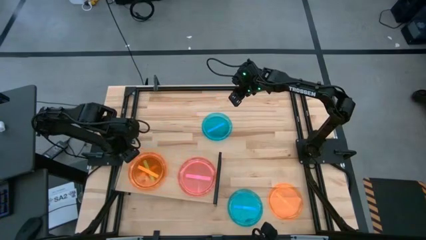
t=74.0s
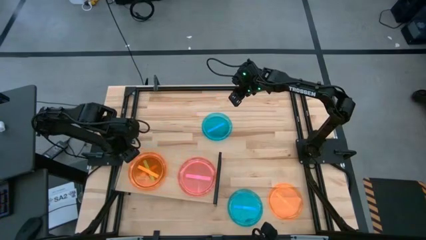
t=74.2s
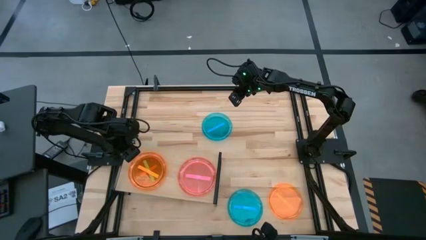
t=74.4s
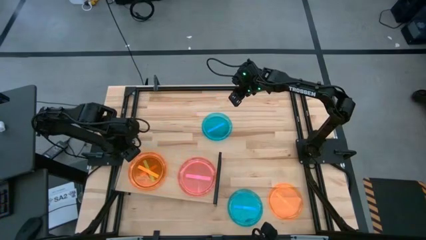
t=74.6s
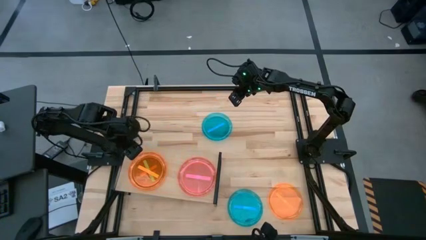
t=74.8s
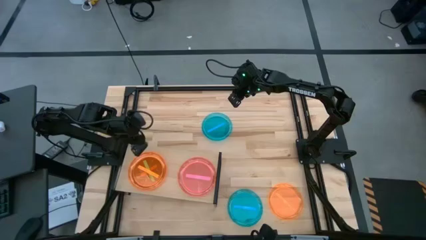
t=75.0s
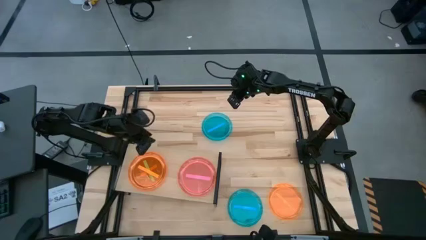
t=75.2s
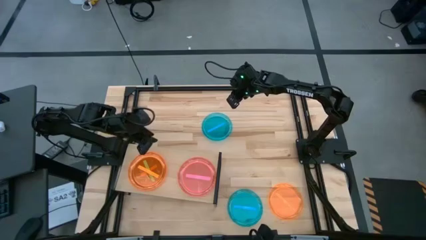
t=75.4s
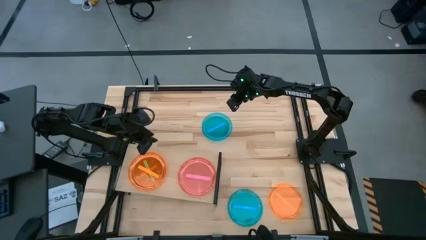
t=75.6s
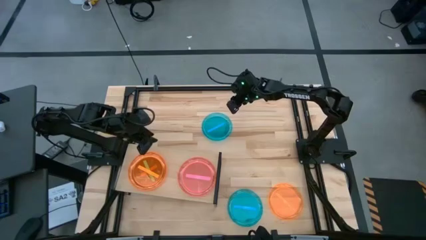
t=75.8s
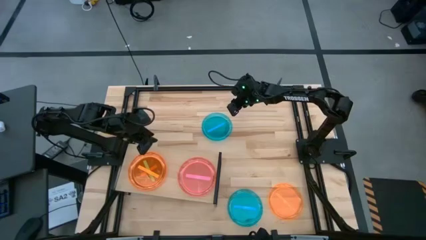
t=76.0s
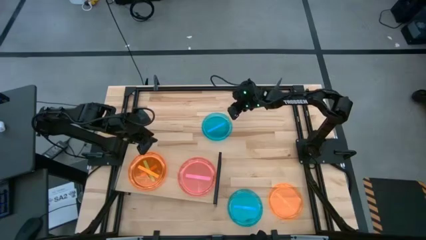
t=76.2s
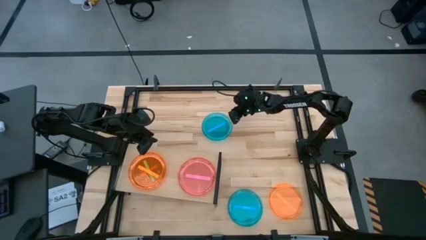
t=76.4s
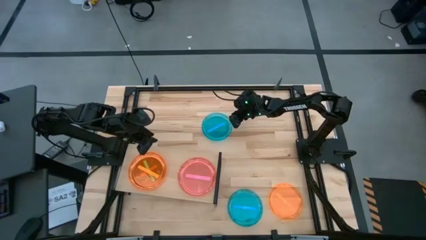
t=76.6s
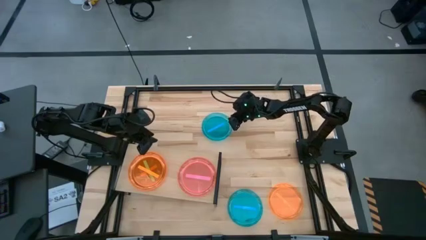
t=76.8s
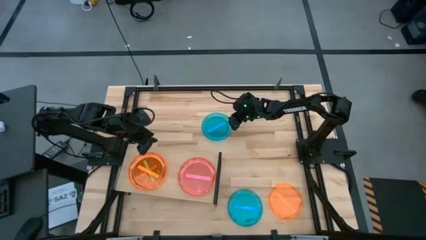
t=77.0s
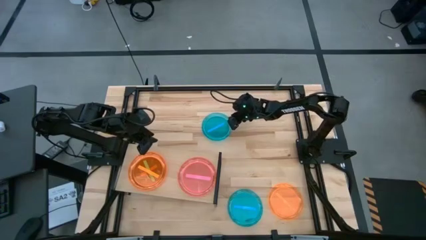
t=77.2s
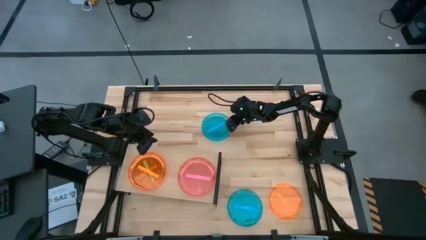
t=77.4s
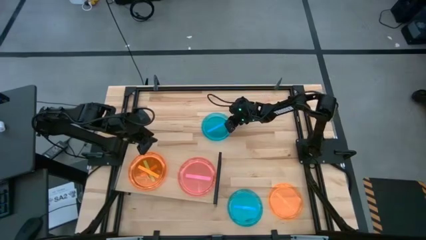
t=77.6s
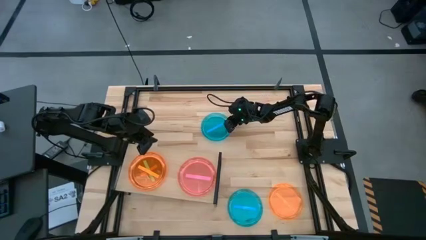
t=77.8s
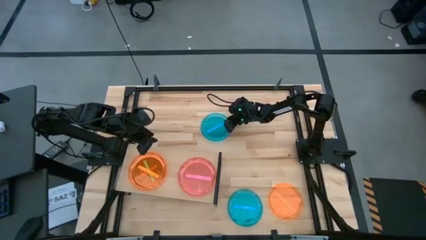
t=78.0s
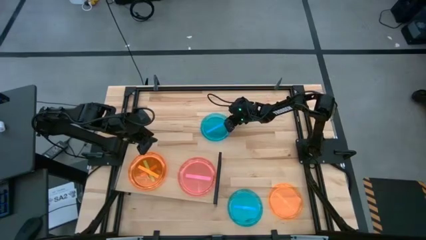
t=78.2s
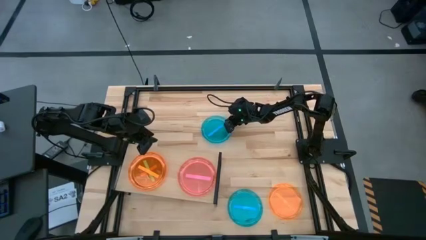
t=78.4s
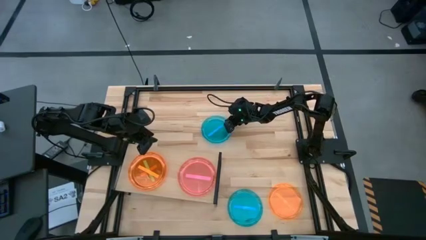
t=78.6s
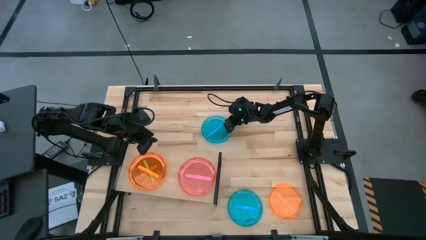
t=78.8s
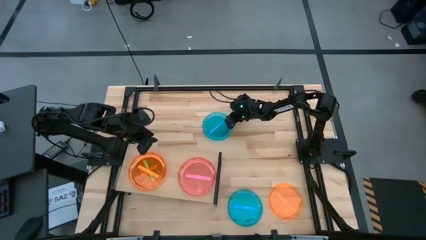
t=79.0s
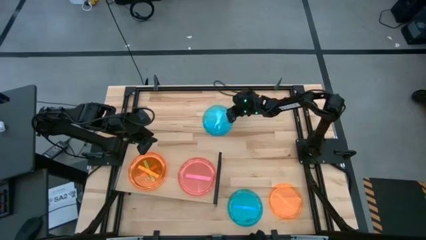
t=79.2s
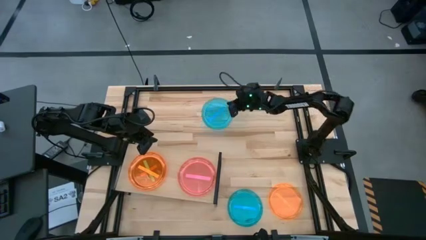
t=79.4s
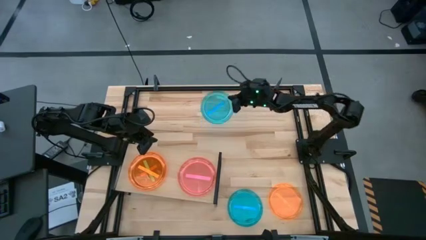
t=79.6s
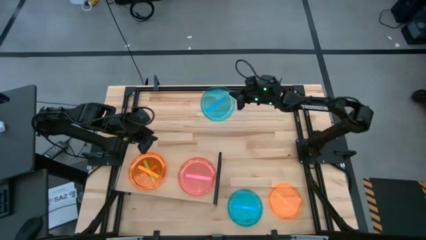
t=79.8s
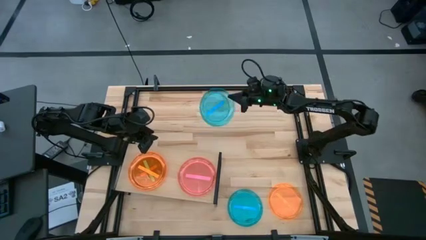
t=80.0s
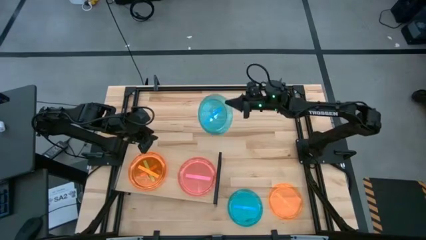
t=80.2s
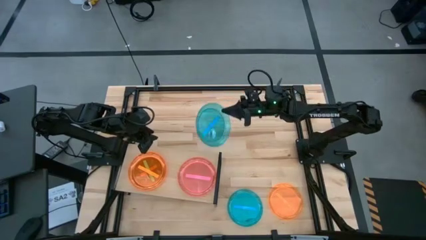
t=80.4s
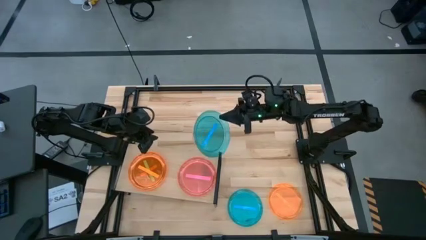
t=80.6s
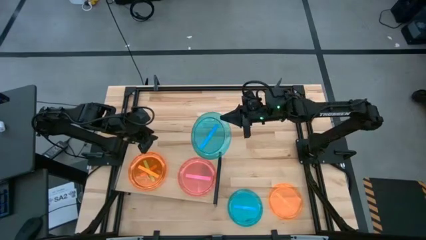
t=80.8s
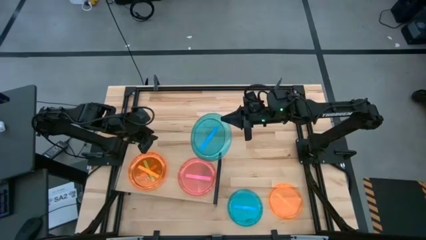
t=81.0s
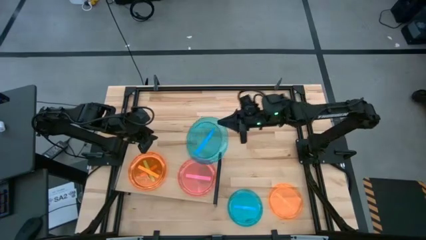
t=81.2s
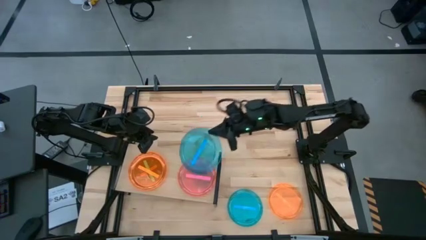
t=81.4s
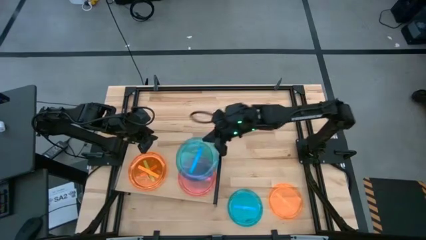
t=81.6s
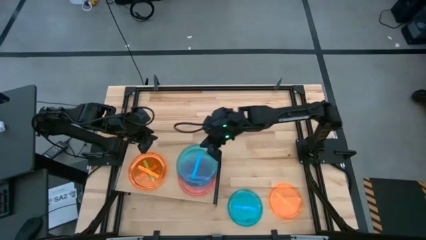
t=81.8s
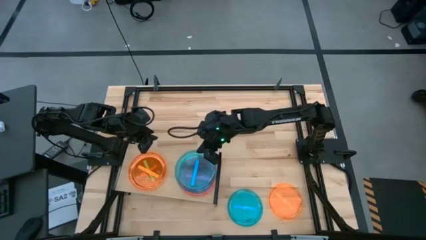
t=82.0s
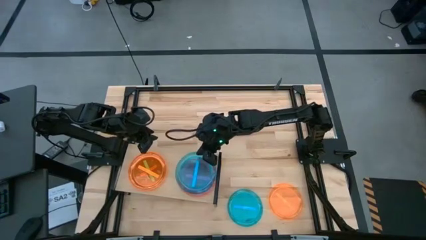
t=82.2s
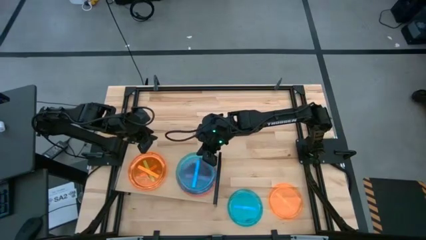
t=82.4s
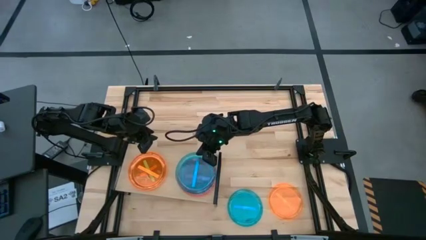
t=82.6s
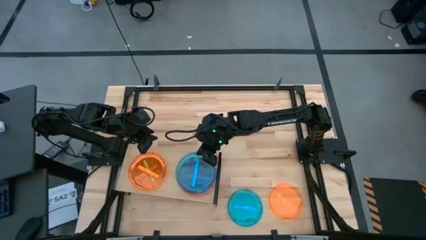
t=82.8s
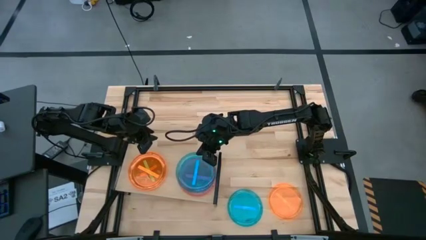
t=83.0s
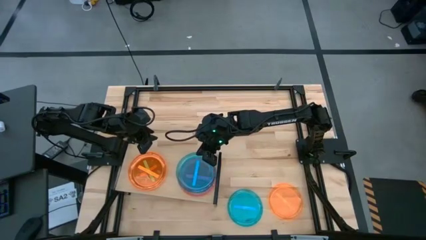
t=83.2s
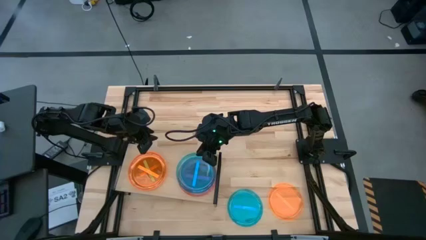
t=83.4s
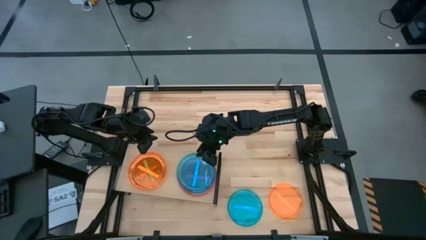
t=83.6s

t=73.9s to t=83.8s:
Task: Place and stack plates onto a shelf
Stack the top blue plate on top of the red plate on the shelf

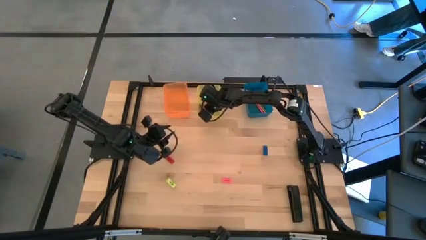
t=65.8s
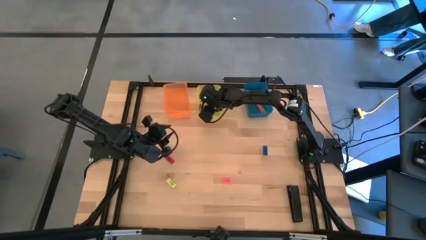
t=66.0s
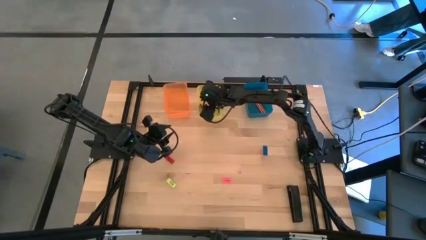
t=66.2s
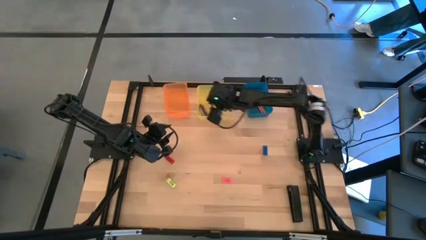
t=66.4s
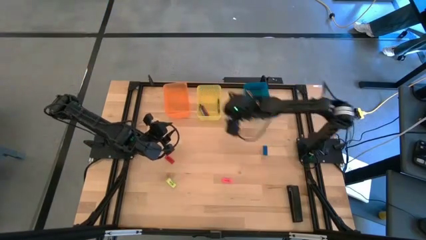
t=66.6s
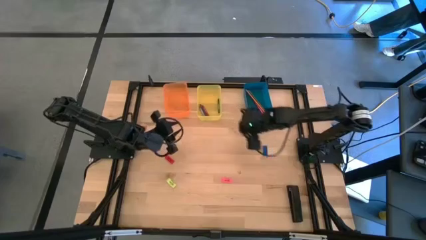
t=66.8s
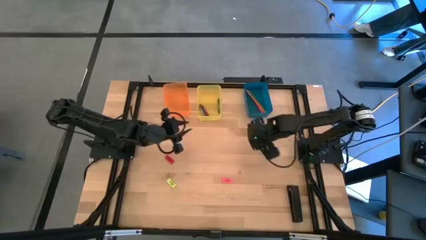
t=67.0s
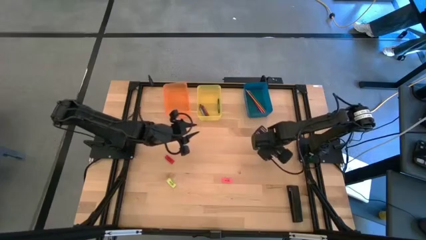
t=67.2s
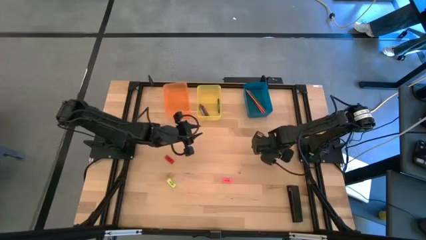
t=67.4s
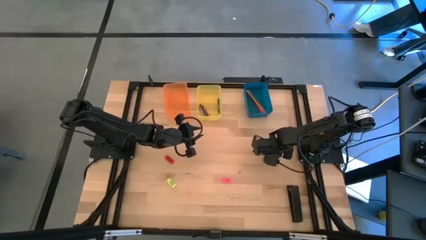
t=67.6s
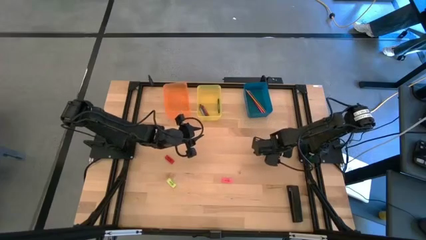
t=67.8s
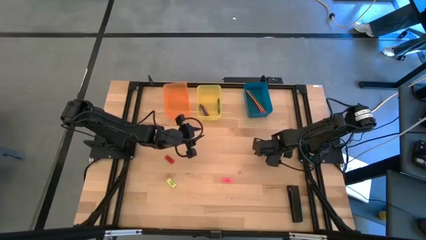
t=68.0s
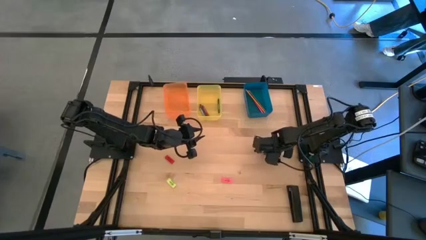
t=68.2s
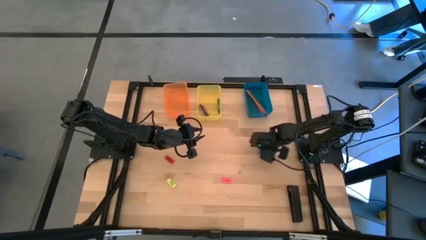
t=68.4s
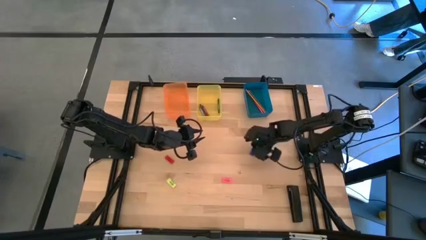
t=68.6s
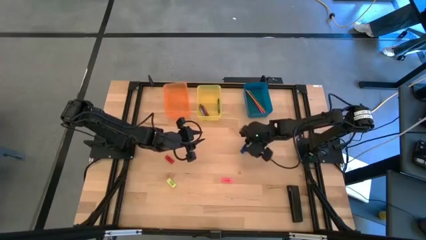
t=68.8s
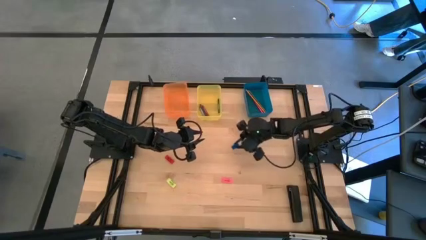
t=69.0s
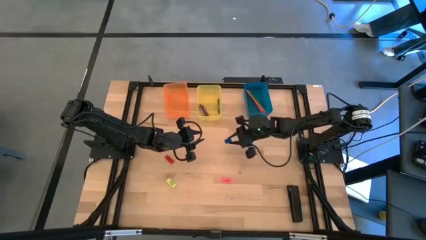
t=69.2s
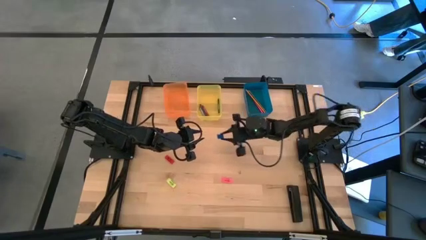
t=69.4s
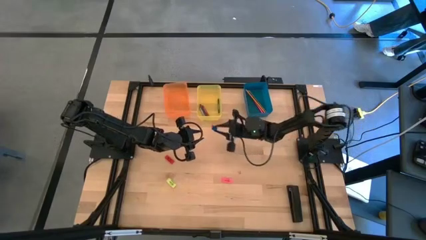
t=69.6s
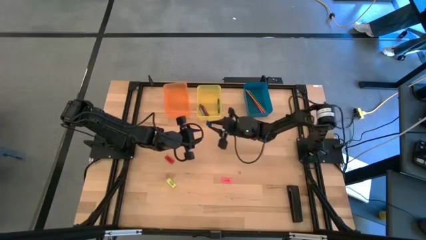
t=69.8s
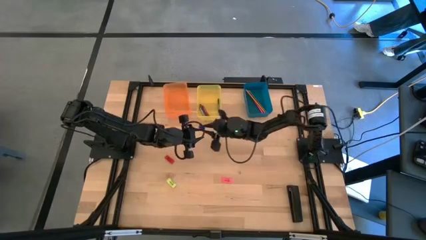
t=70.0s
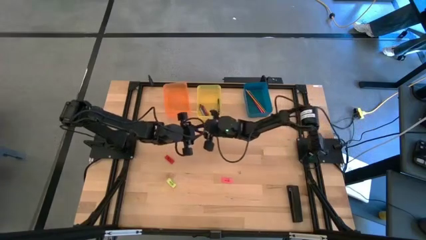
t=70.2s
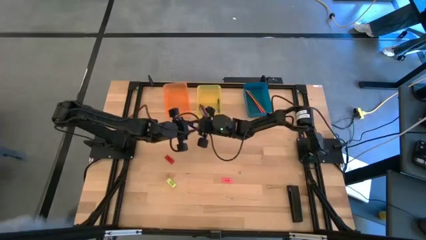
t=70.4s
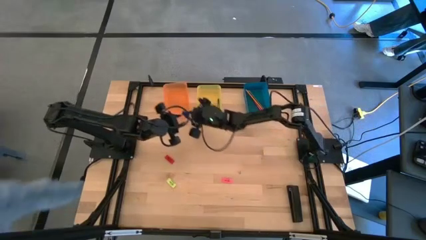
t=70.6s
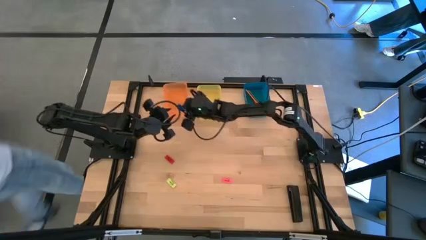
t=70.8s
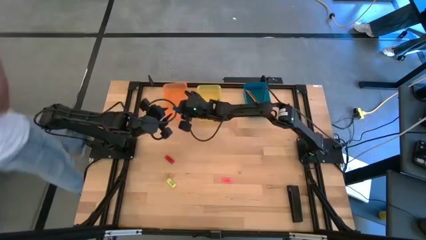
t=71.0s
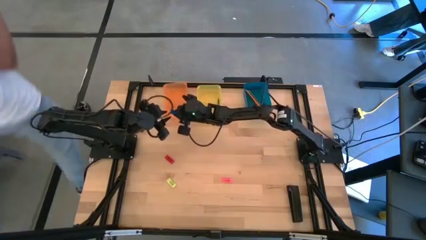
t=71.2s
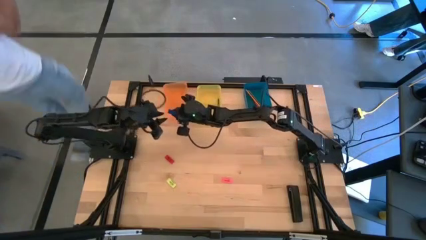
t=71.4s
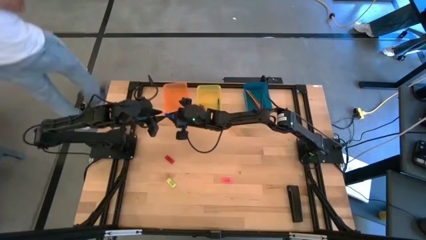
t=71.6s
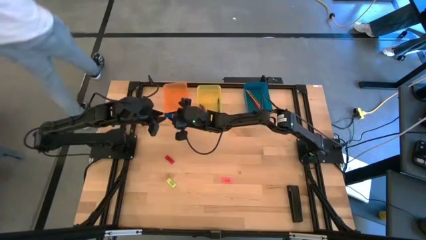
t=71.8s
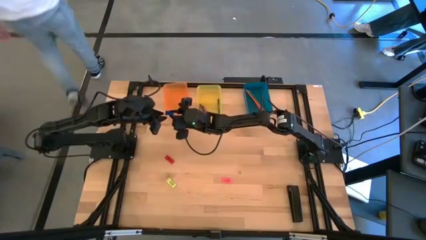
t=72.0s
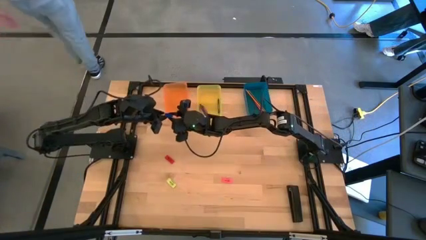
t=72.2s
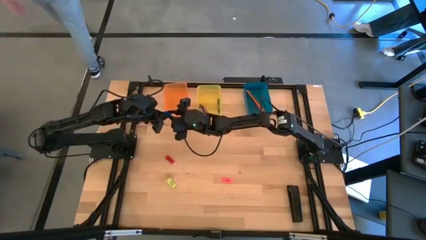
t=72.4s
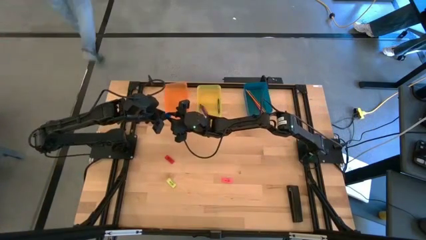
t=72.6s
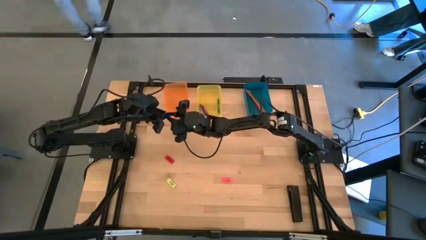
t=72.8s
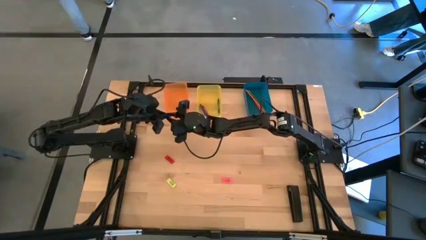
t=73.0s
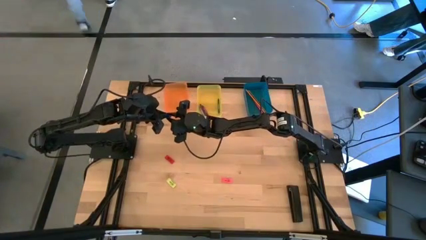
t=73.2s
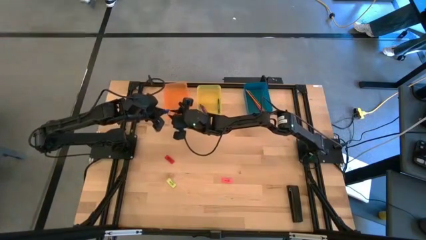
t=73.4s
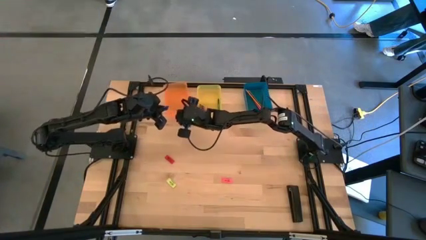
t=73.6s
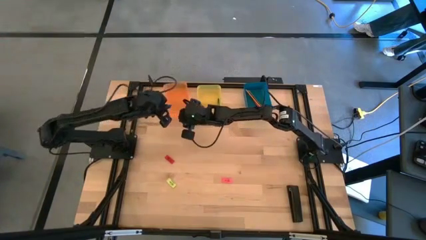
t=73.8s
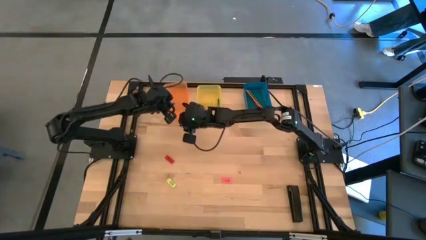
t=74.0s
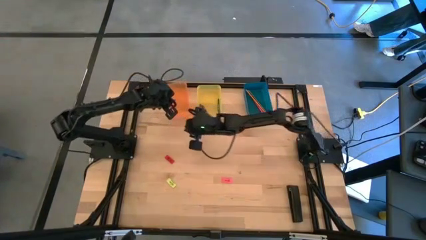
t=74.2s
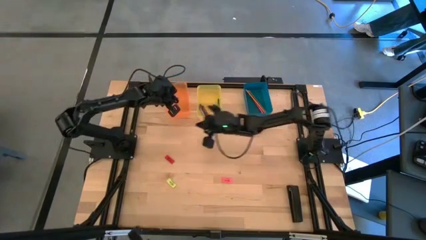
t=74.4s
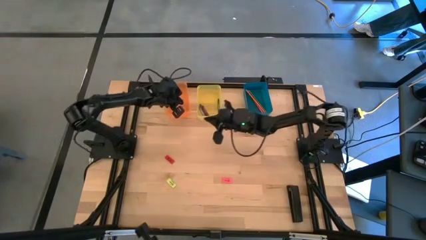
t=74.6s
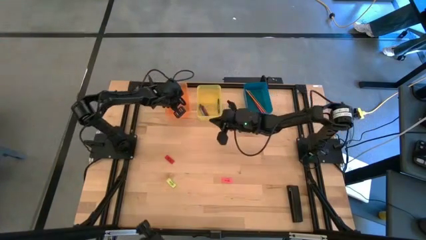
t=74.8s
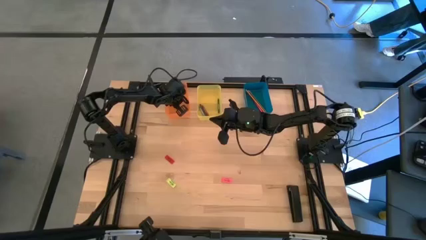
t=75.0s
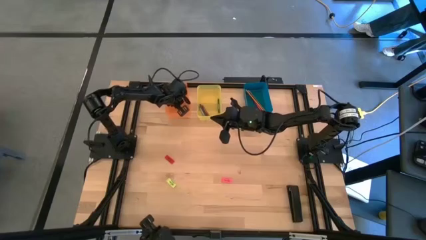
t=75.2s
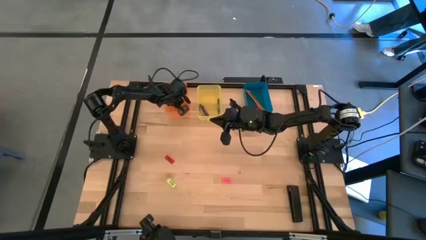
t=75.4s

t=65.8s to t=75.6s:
Task: Sort crayons/erasers/pens/pencils in bins
Put the blue eraser into the orange bin
